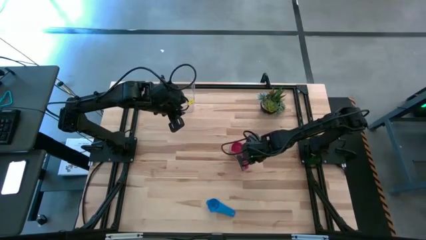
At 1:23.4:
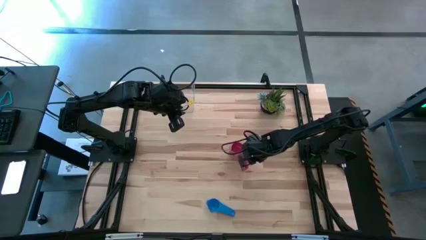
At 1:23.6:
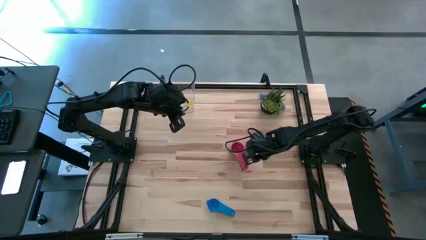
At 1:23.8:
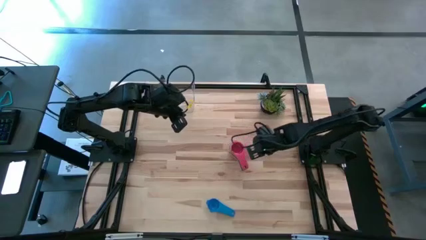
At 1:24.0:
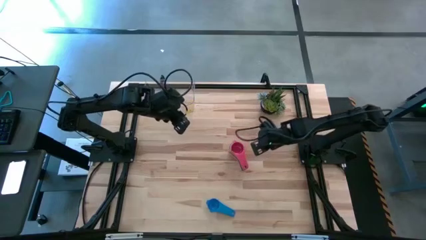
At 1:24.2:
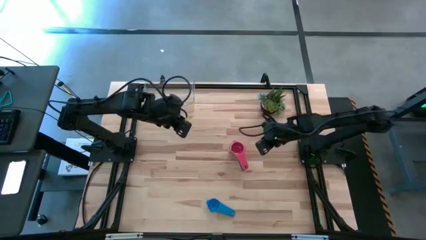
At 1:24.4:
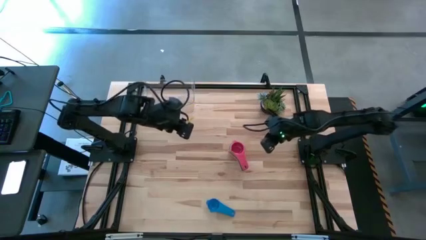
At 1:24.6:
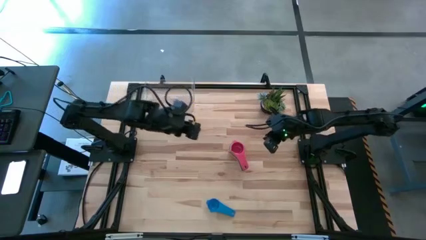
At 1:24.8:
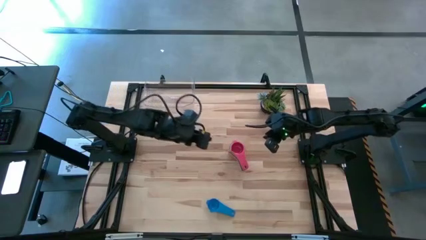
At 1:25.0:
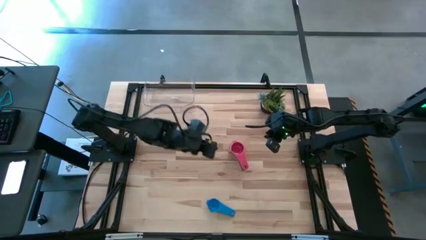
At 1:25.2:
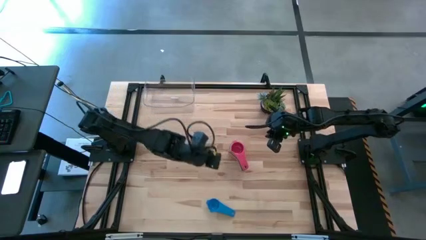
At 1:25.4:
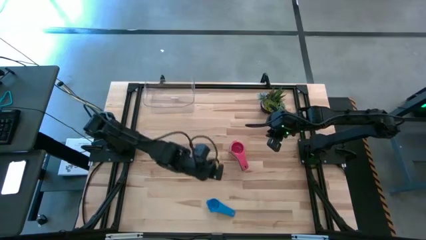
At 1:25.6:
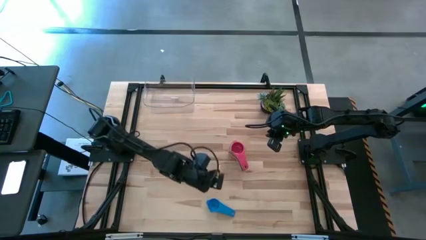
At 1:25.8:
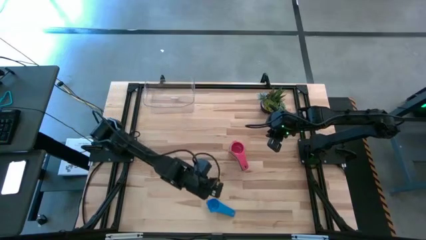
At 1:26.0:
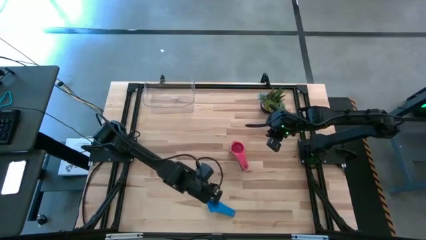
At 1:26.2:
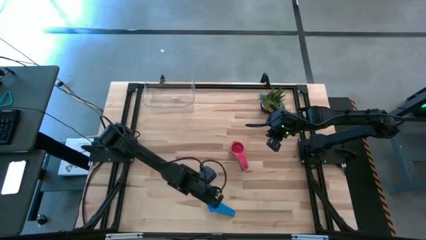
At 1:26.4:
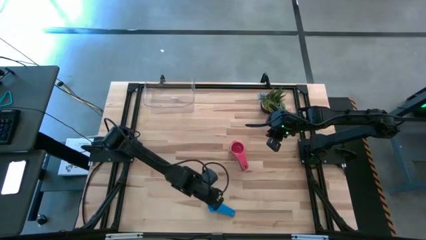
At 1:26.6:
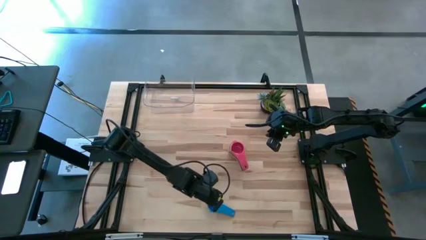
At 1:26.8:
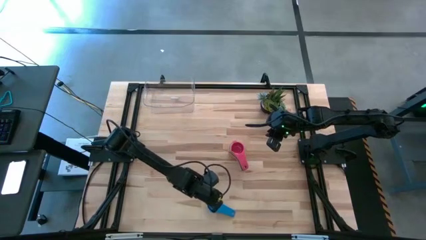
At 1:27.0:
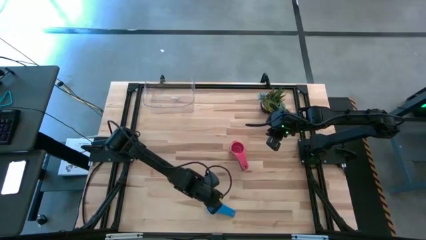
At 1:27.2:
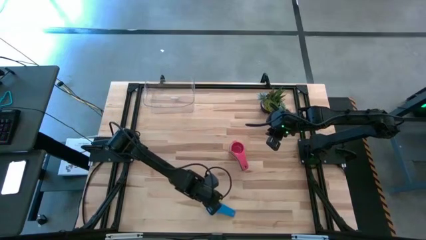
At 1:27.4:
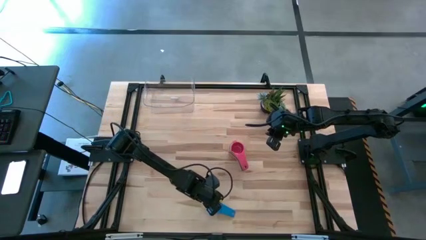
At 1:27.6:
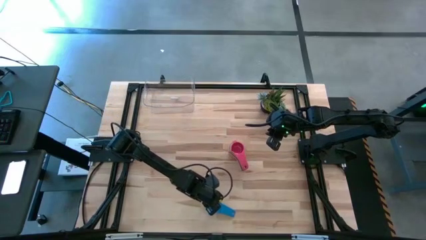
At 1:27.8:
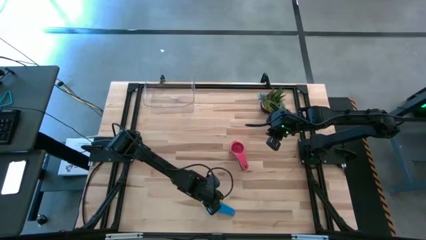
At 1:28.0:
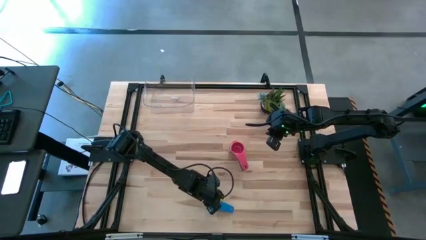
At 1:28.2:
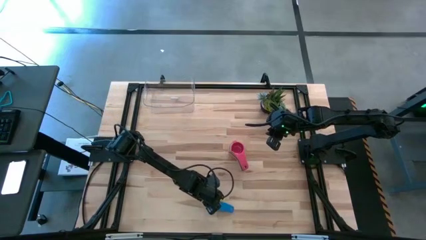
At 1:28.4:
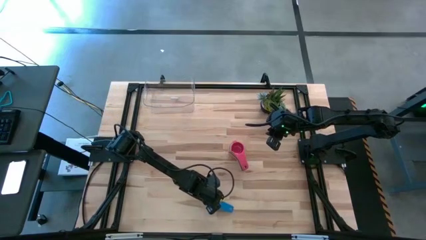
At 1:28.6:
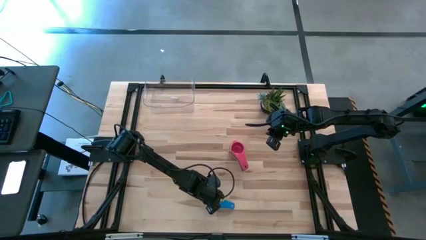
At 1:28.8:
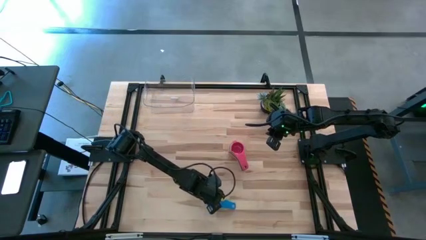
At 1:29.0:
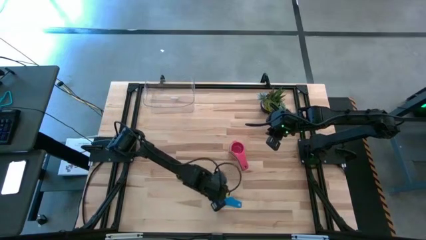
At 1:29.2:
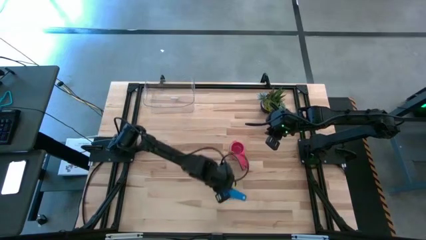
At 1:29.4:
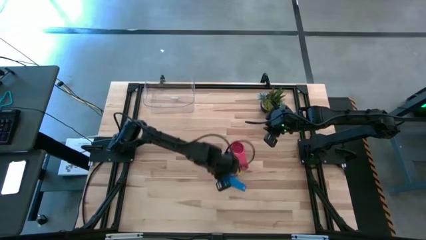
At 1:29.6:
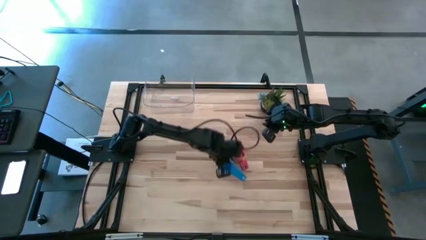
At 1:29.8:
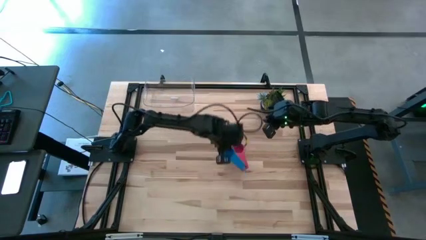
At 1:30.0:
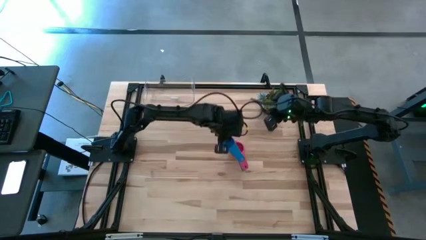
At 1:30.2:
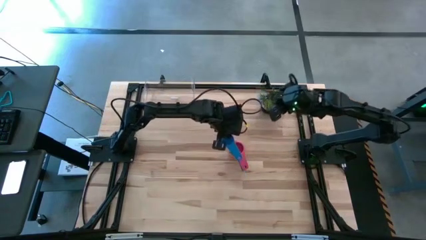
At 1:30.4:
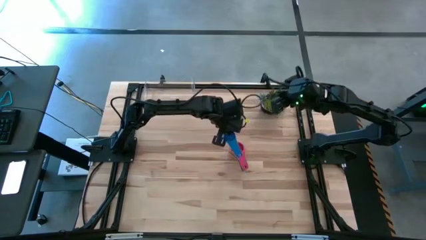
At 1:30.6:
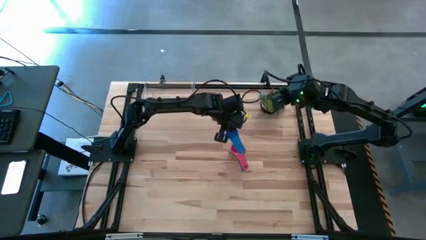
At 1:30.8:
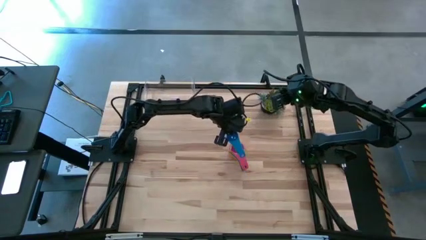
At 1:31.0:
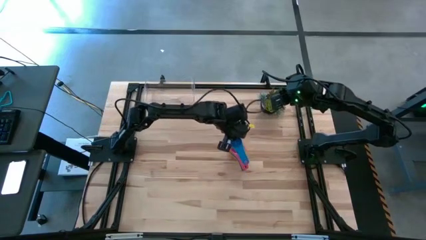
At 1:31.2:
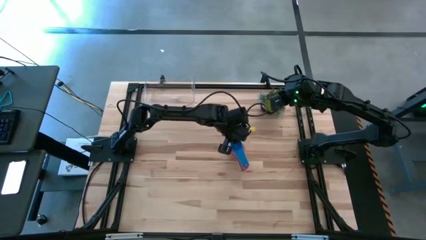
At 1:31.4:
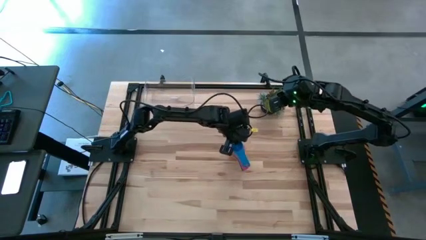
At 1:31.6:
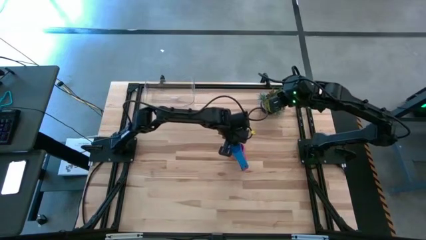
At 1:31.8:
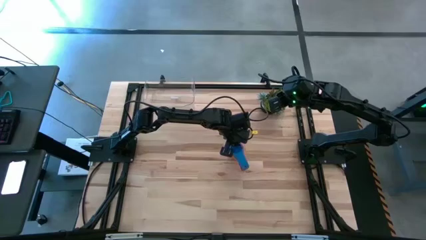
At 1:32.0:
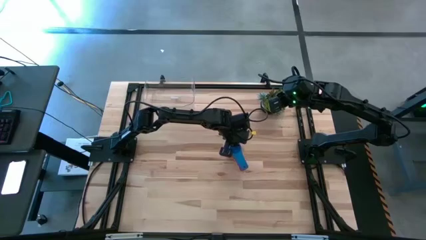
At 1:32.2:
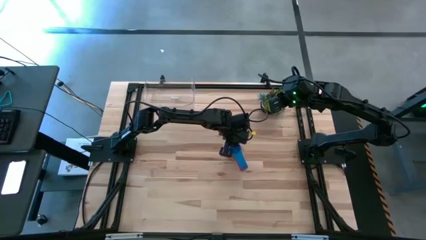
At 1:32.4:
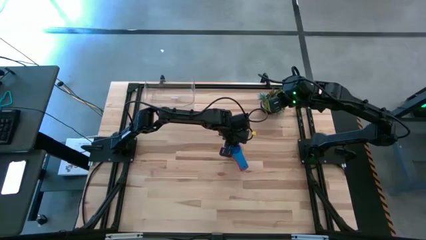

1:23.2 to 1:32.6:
Task: Nest measuring cups in basket
Stack the blue measuring cup on top of the light red measuring cup
